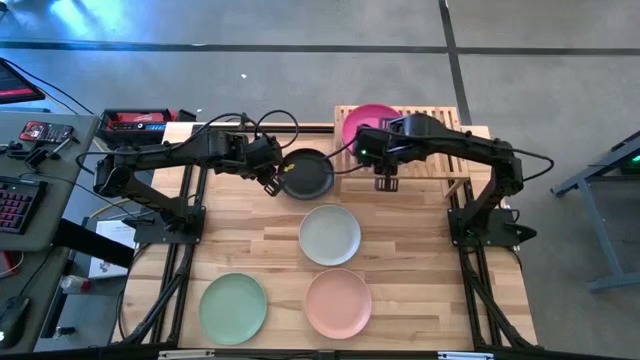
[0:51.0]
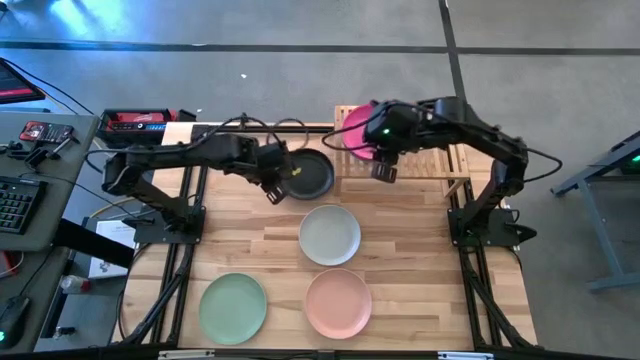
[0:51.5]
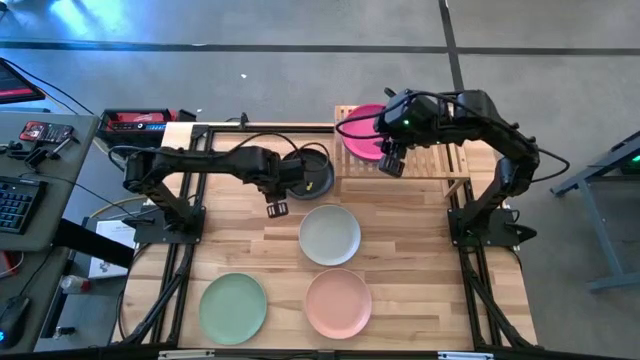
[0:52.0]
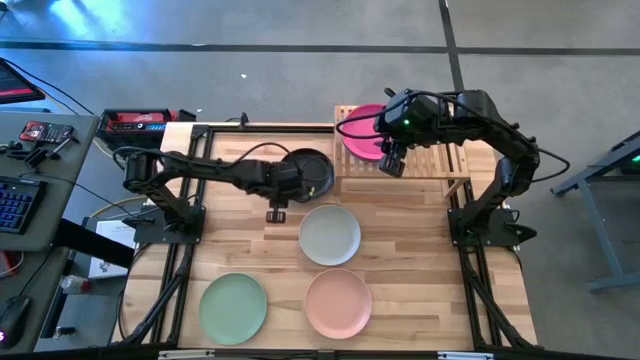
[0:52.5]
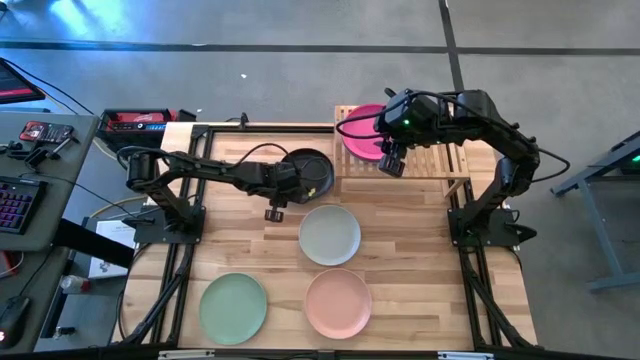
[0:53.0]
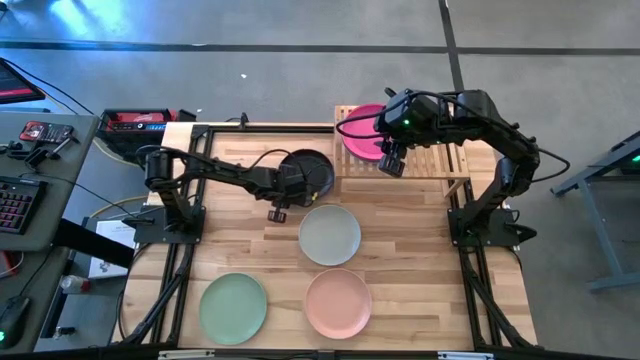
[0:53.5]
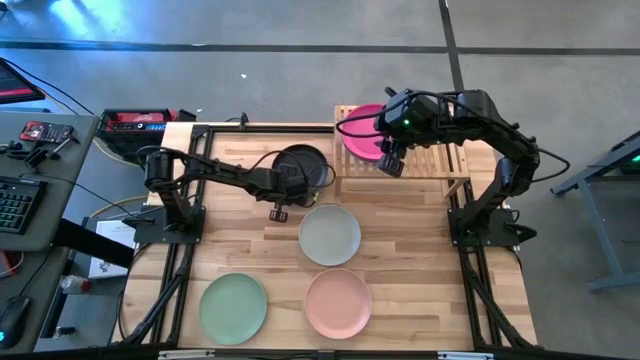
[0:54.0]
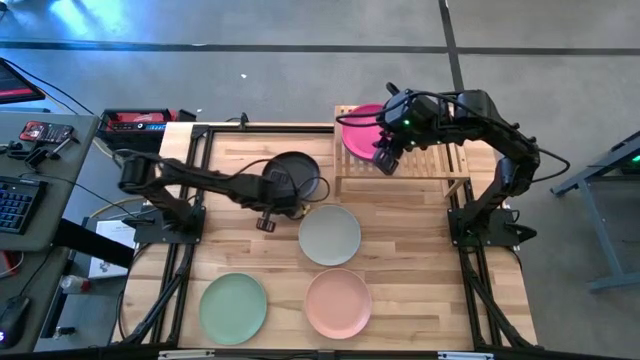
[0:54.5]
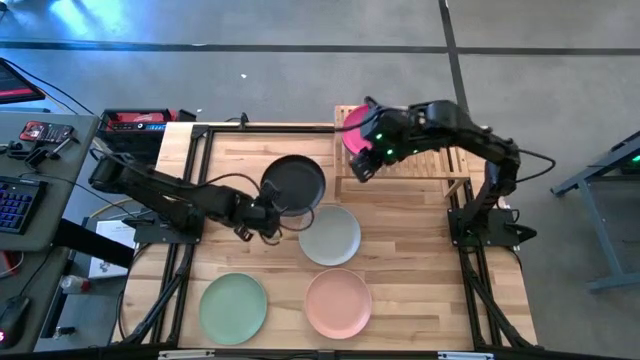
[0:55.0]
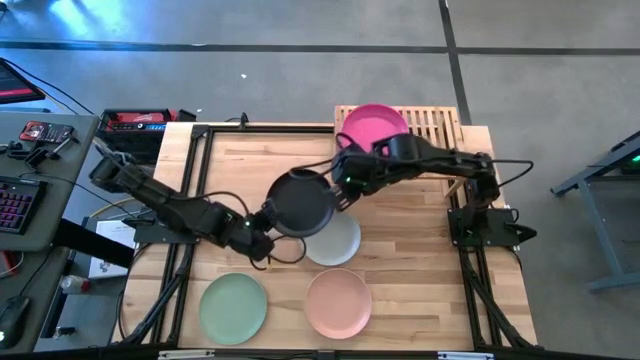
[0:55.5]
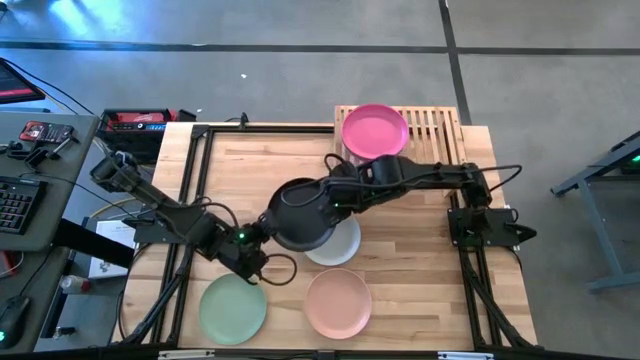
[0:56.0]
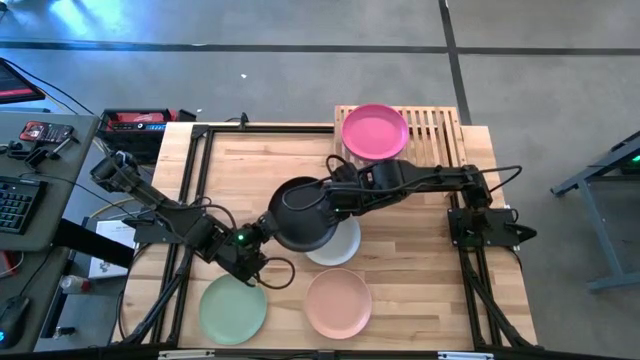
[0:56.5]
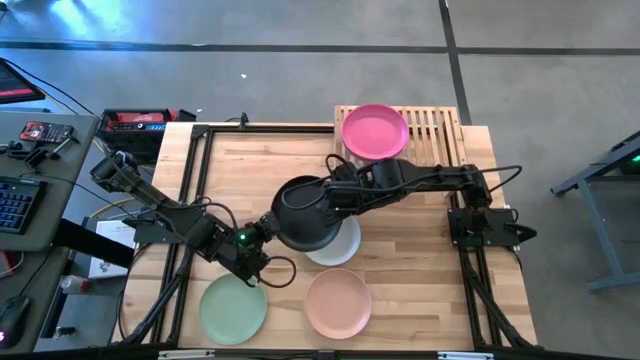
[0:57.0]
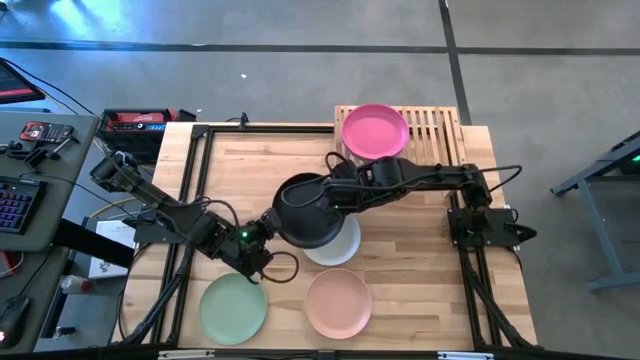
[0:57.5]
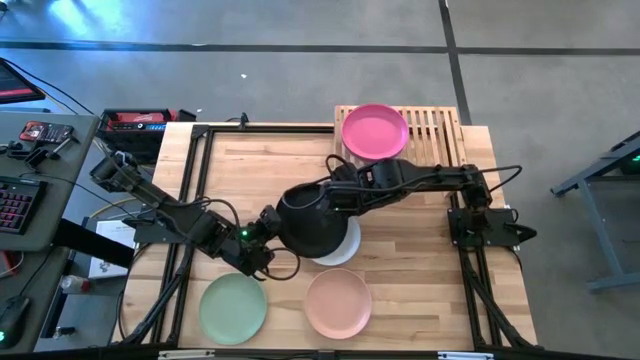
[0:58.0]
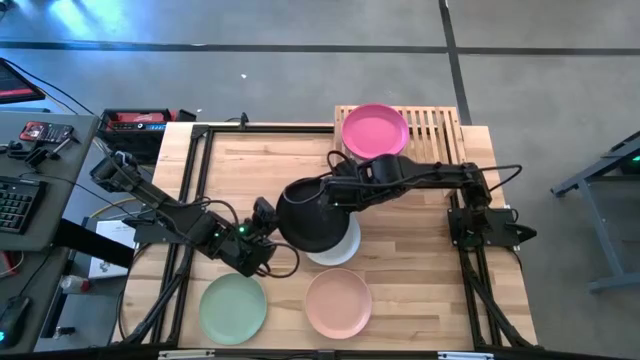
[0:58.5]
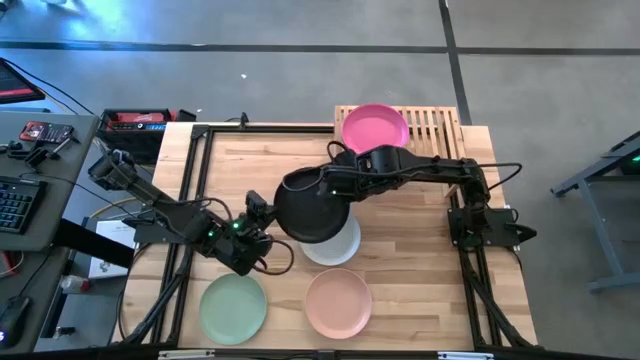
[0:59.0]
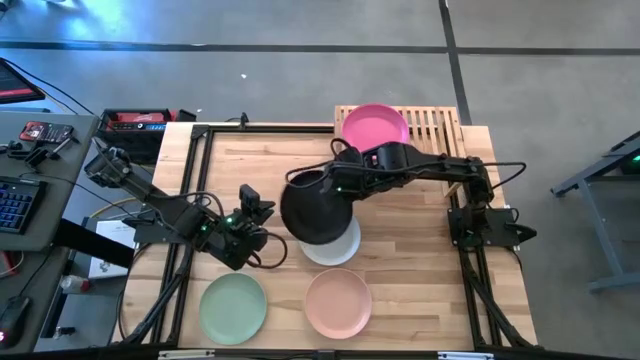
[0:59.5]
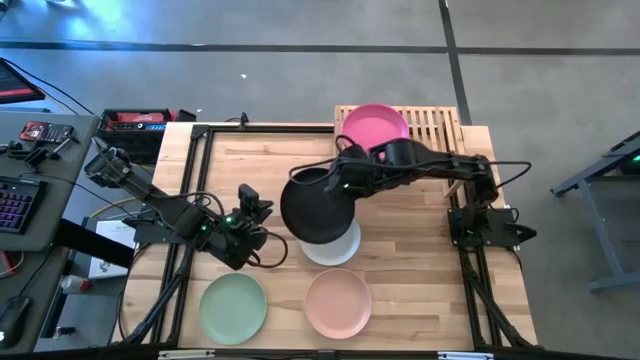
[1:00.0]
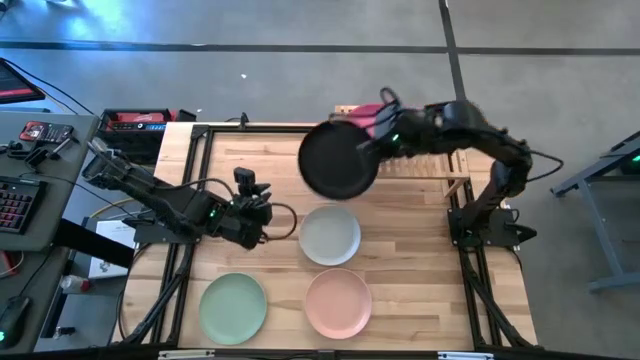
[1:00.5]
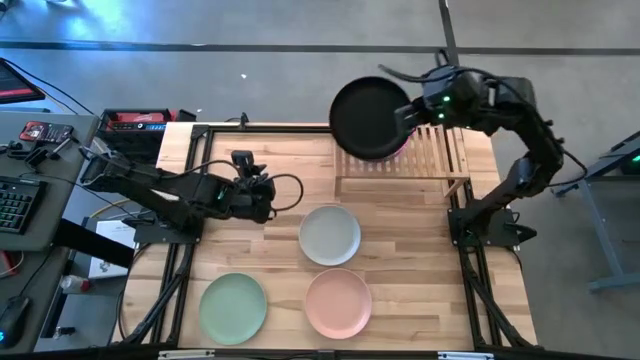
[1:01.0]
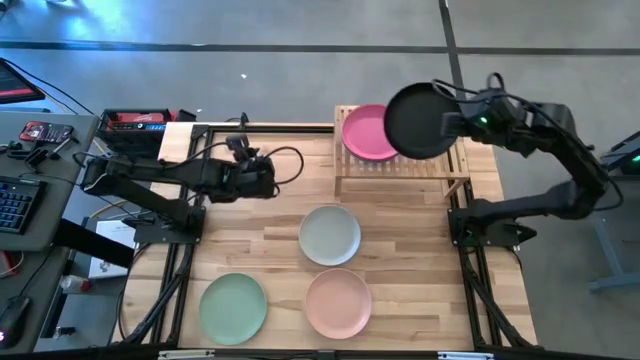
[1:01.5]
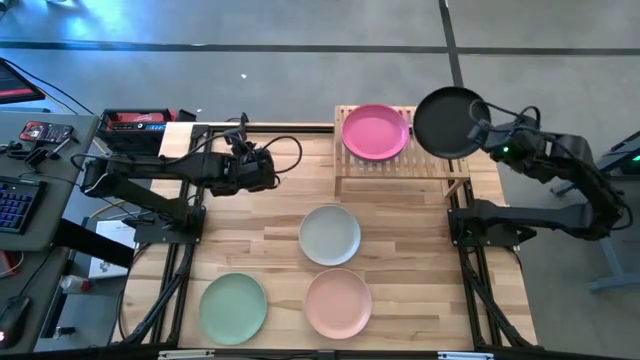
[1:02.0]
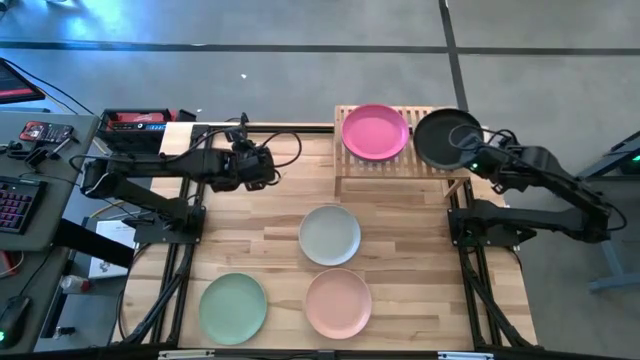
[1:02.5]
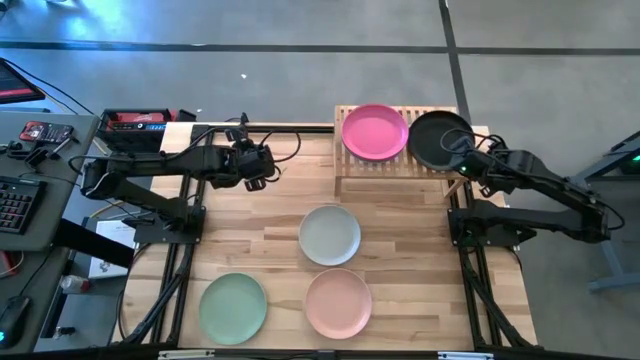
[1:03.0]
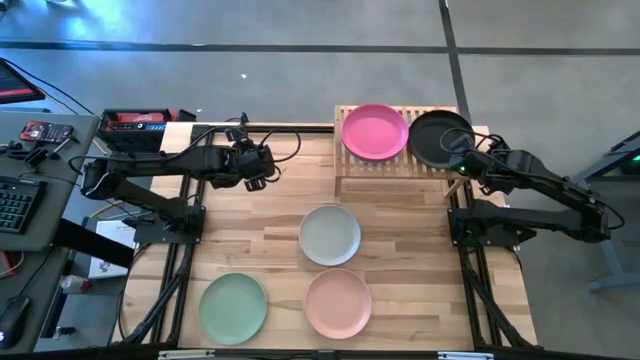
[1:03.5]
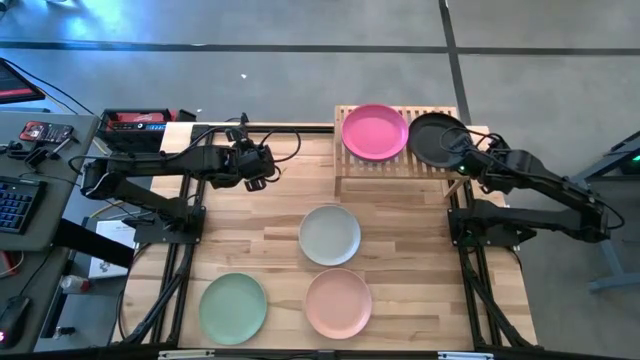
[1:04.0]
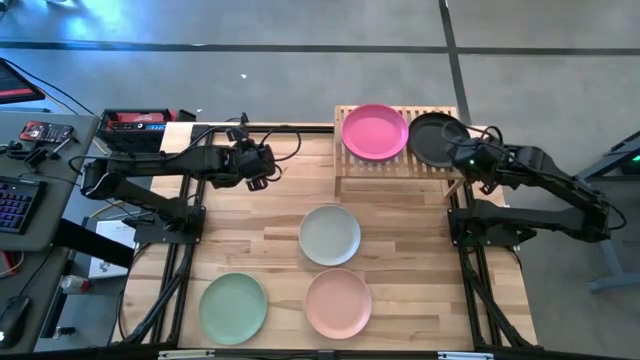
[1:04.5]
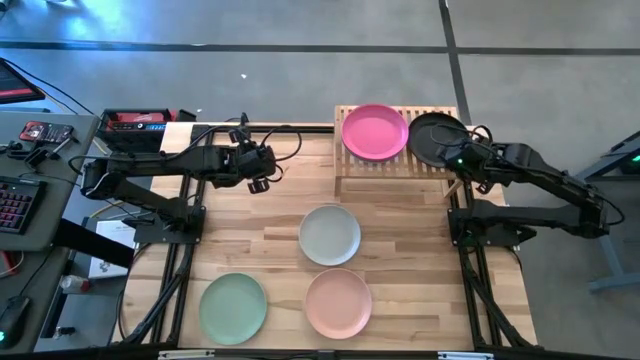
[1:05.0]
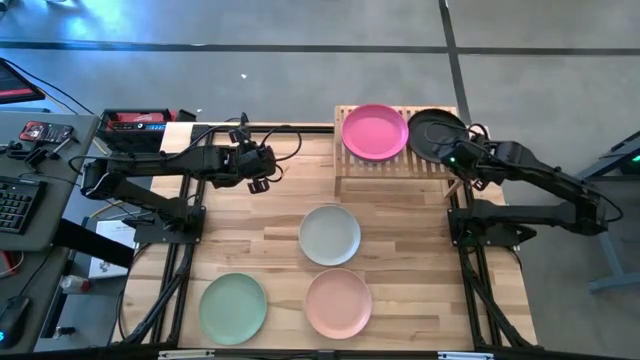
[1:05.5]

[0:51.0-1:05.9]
Task: Place and stack plates onto a shelf
Put the black plate on the shelf

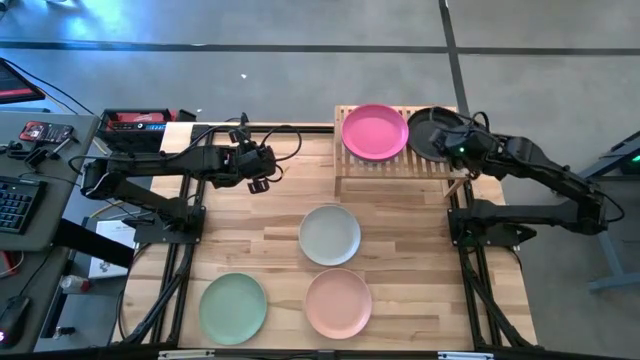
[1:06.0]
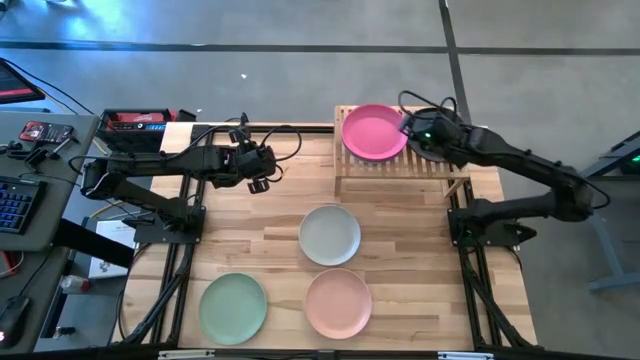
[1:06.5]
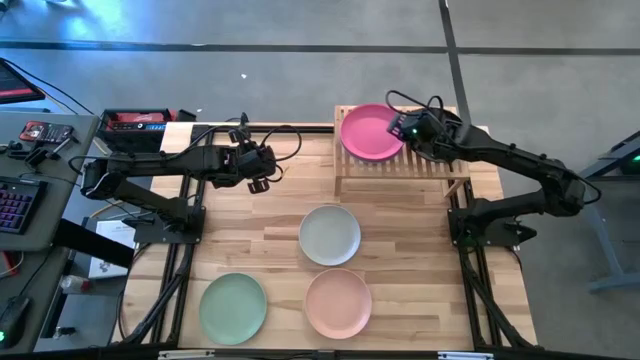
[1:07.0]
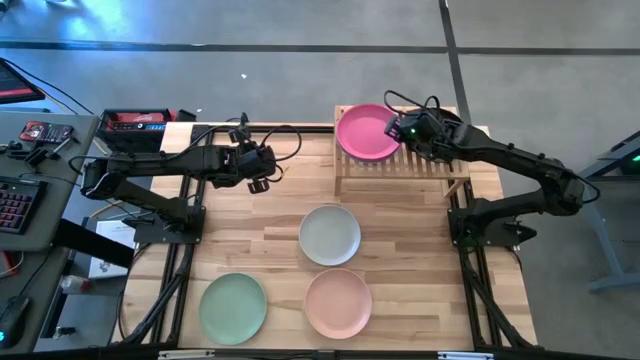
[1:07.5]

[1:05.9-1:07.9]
Adjust the stacked colored plates on the shelf

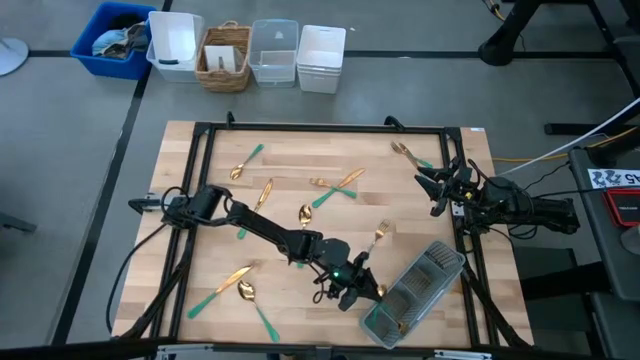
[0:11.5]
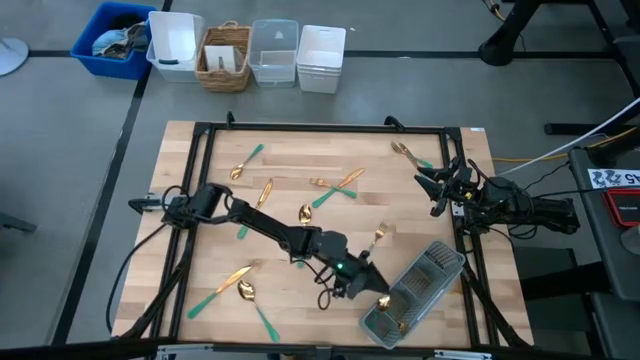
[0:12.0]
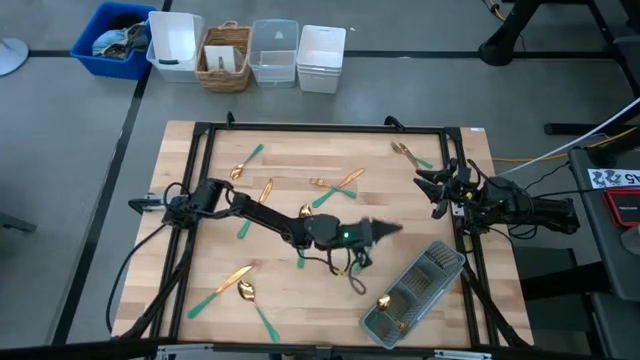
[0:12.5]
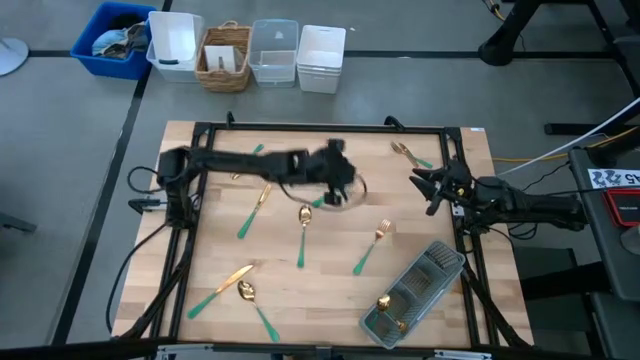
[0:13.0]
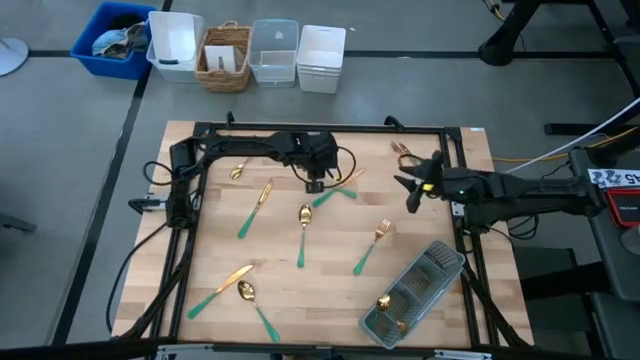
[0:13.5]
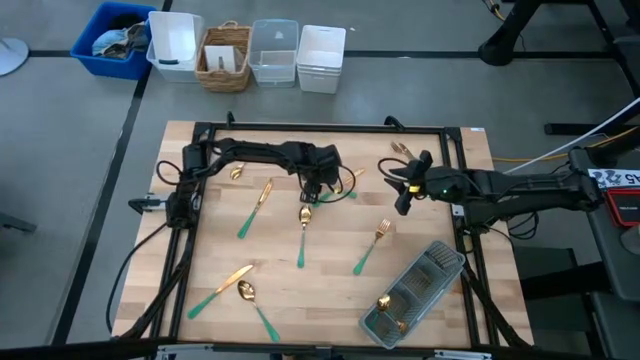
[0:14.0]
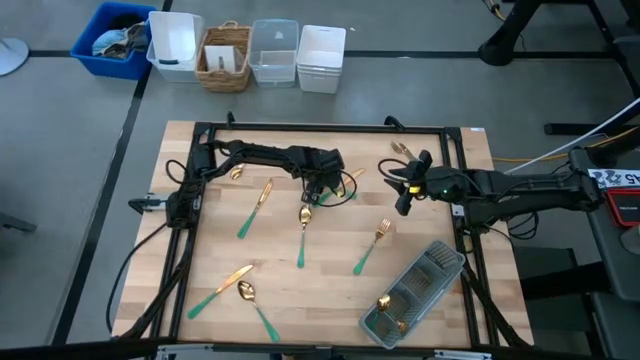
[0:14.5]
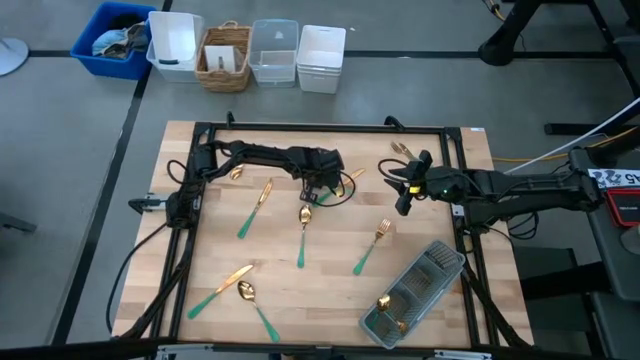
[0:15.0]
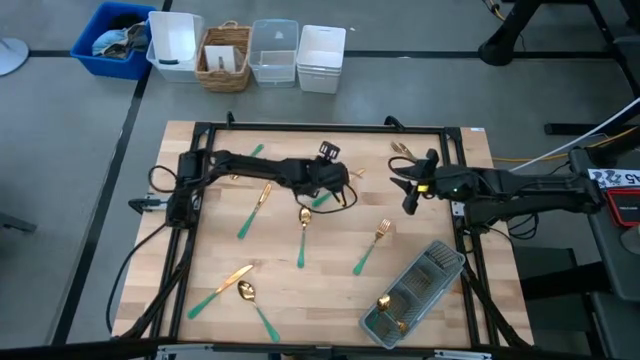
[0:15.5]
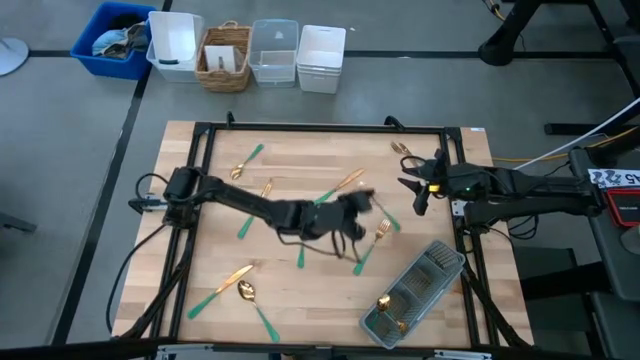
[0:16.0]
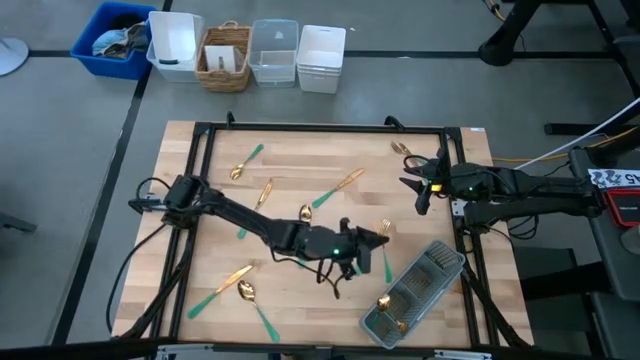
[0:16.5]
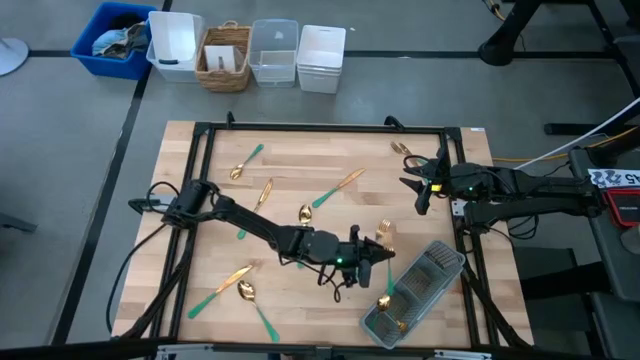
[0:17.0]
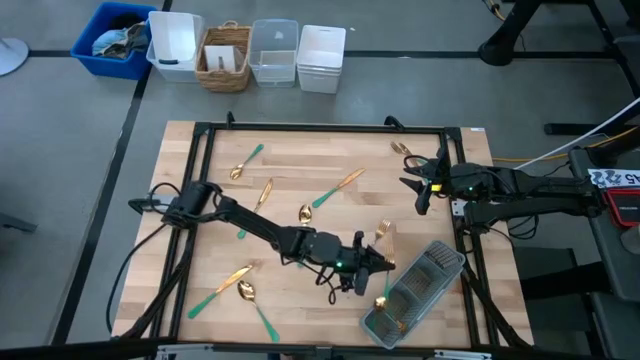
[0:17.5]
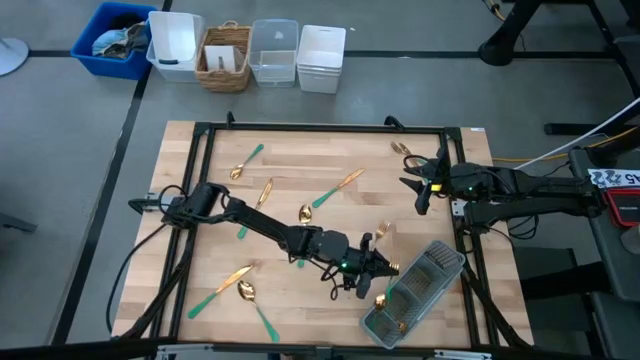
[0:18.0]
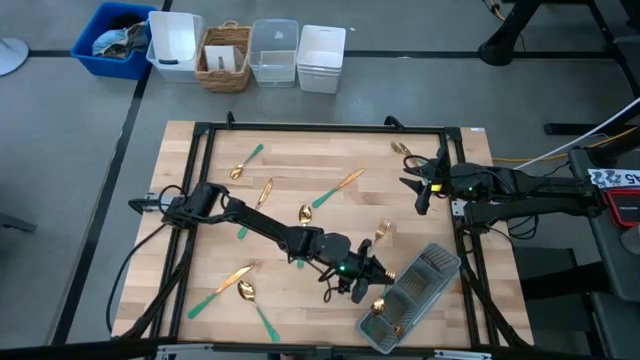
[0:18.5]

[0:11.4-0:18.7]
Task: Sort silverware
Put the top left fork into the utensil organizer
